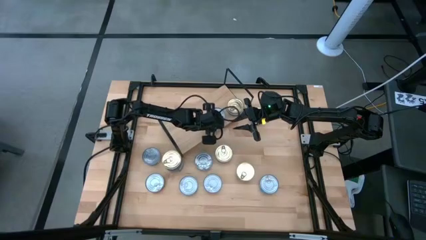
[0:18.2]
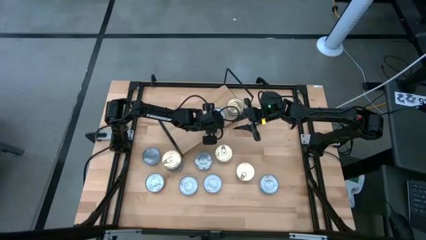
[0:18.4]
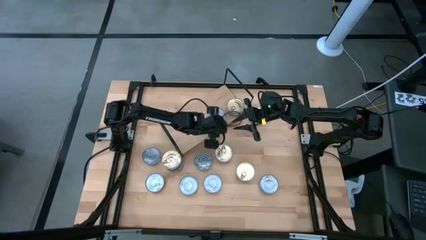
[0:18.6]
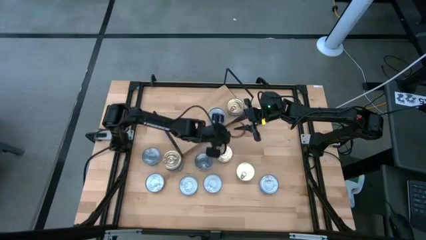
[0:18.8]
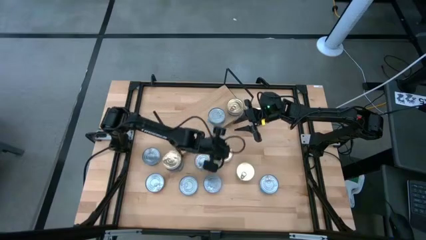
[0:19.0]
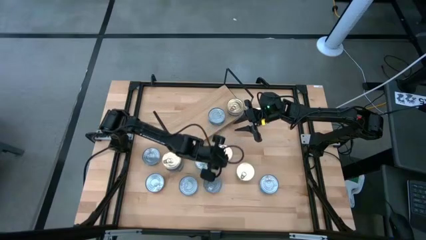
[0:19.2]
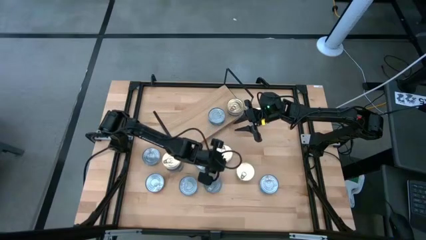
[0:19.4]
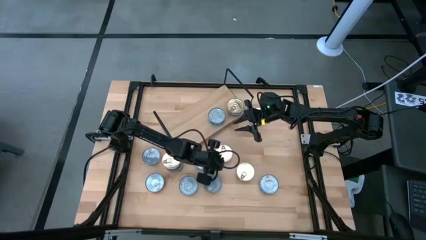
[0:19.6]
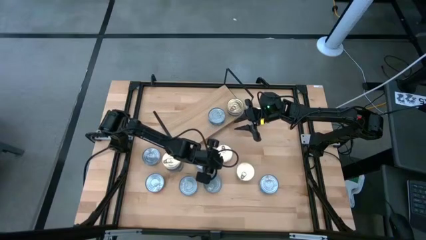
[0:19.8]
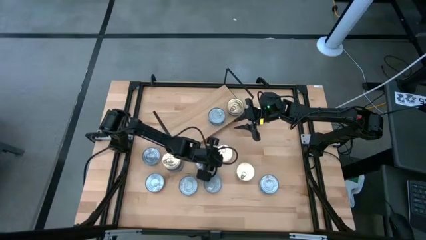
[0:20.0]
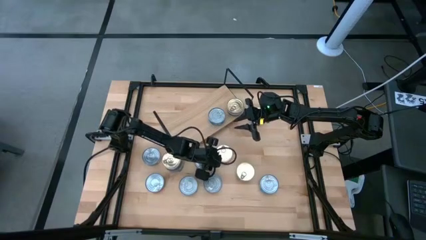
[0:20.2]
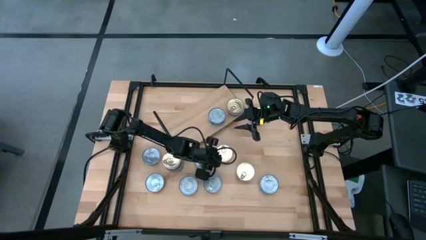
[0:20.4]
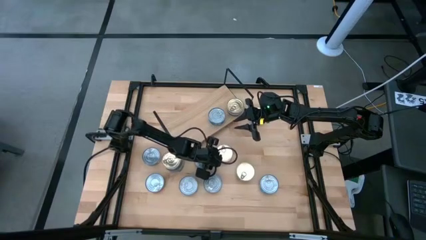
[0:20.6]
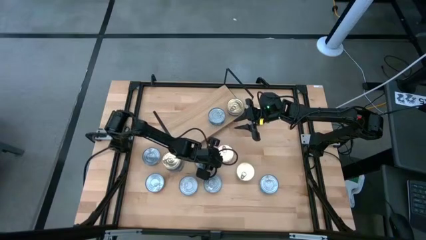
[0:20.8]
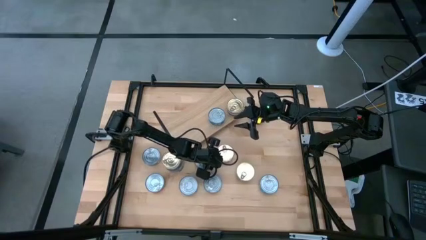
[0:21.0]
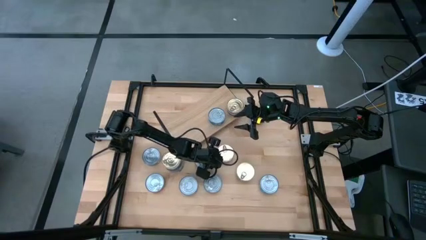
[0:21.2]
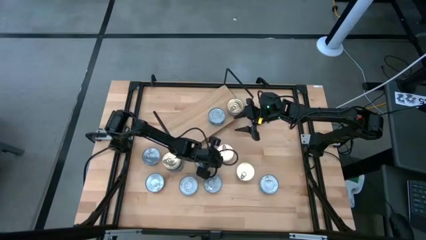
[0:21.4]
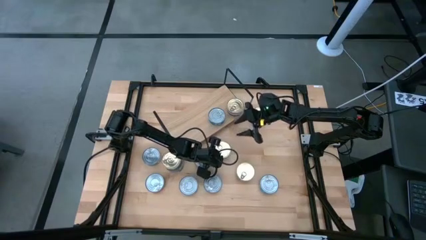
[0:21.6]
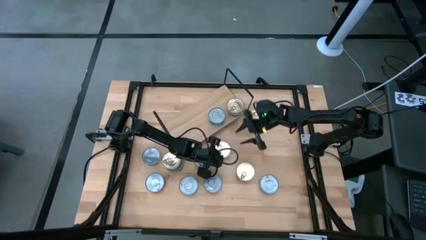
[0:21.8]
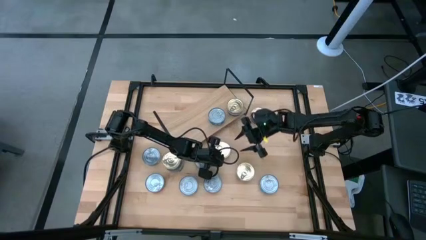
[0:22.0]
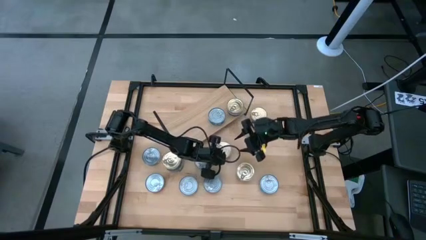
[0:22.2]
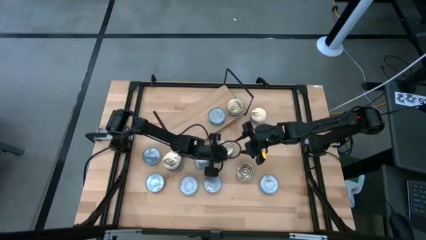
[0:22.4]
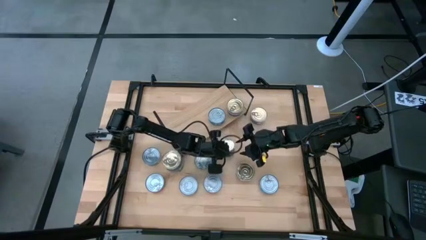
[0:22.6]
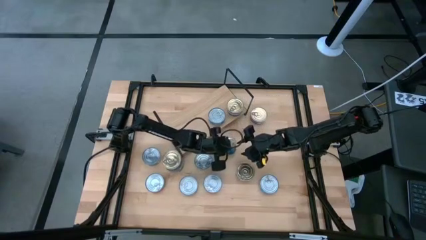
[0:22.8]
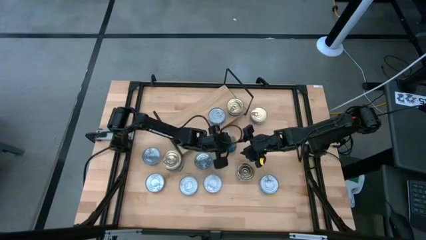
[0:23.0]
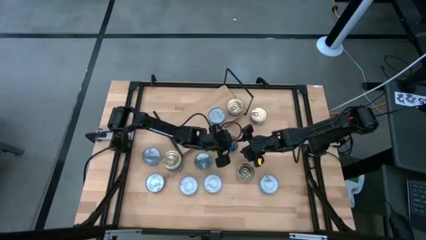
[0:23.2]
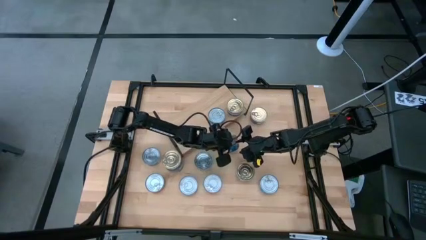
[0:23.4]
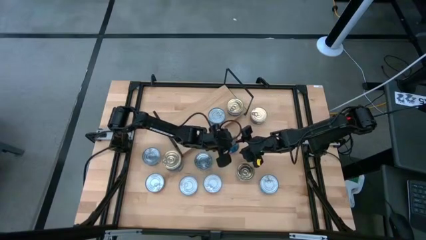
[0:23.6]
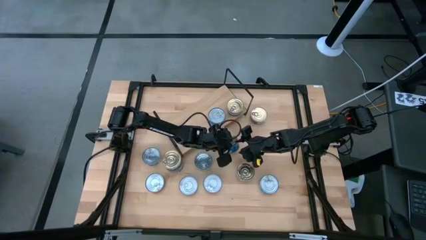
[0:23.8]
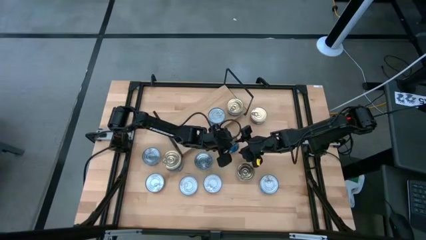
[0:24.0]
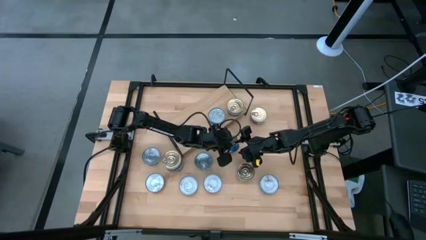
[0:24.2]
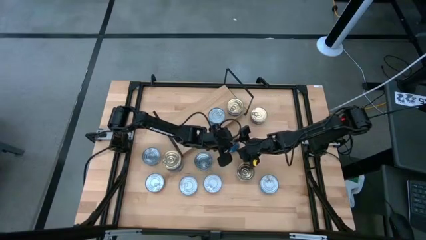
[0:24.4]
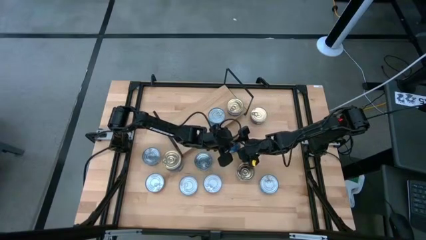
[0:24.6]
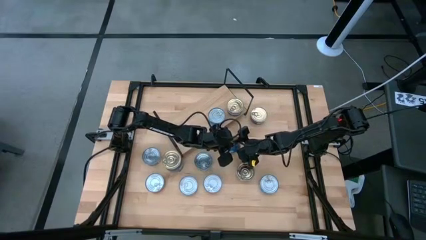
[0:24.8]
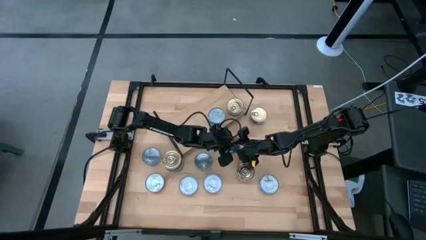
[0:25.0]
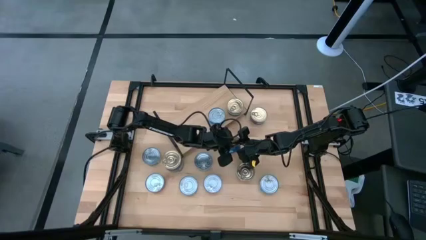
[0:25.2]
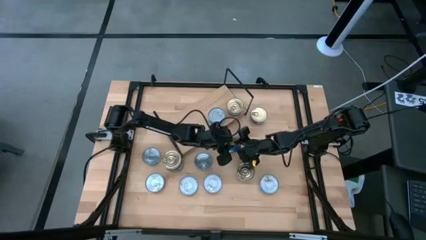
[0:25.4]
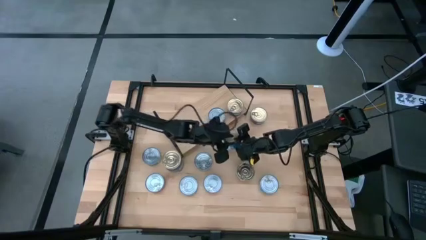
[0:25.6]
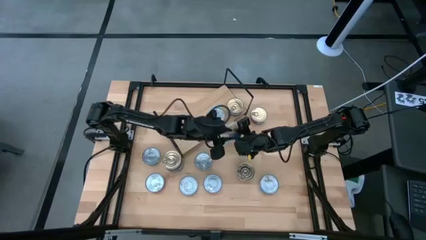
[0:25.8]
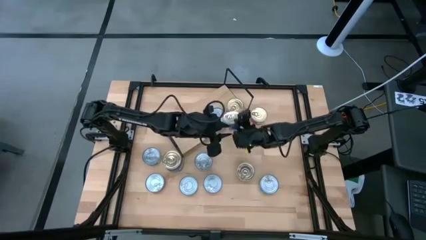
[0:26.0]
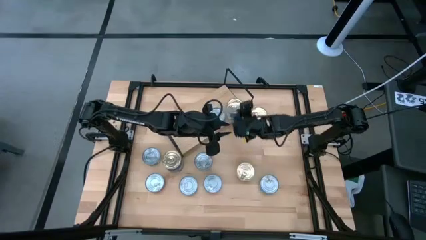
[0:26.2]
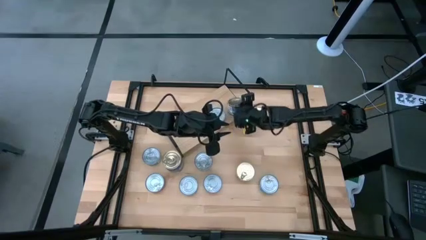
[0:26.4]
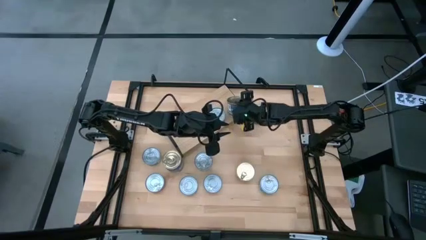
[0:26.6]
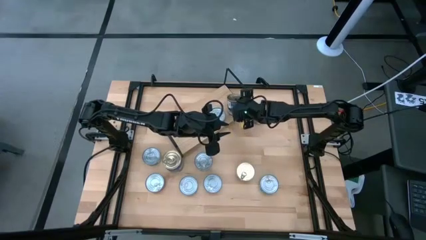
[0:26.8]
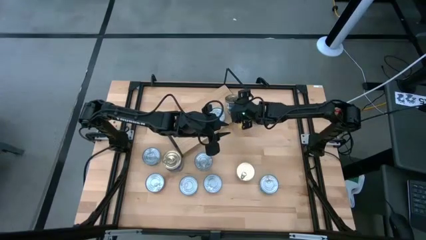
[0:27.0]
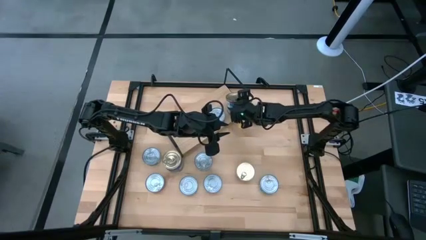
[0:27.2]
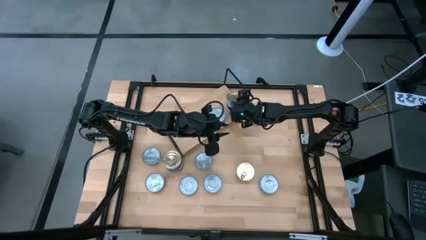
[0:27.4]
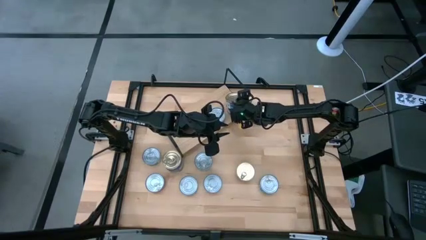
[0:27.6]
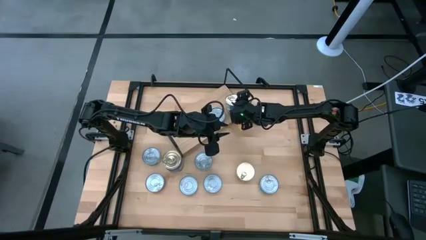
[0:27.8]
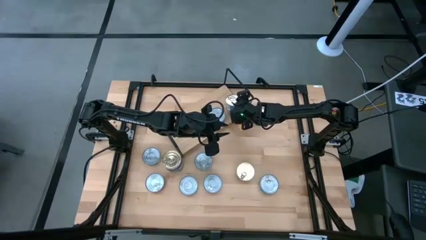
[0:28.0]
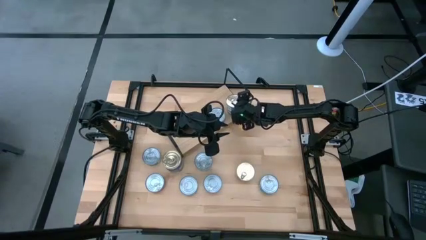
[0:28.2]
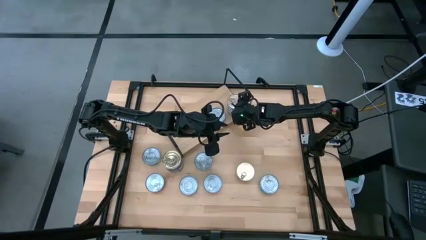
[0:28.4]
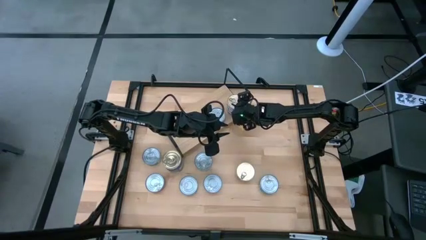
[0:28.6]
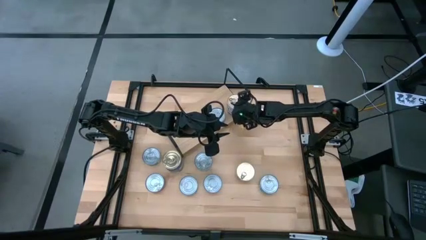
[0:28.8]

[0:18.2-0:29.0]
Task: Stack canned seafood by type on shelf
Stack the blue pink tuna can on top of the blue pink tuna can on the shelf

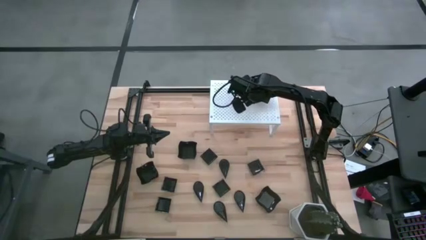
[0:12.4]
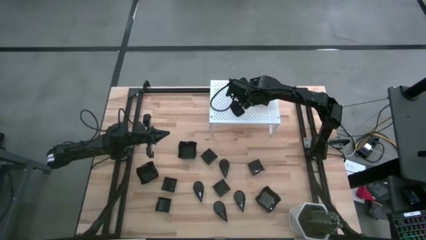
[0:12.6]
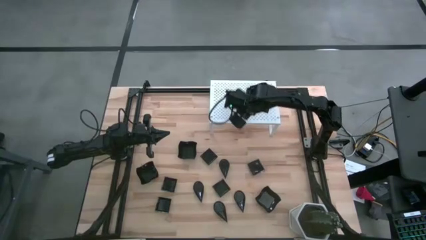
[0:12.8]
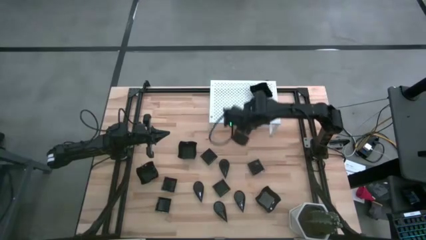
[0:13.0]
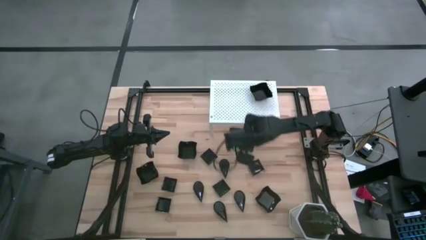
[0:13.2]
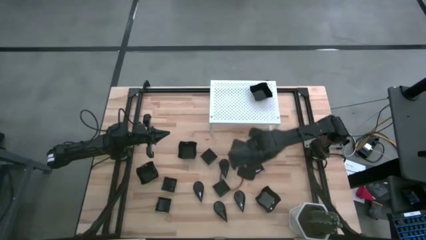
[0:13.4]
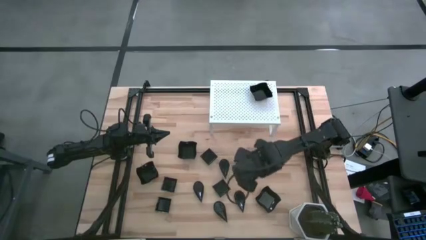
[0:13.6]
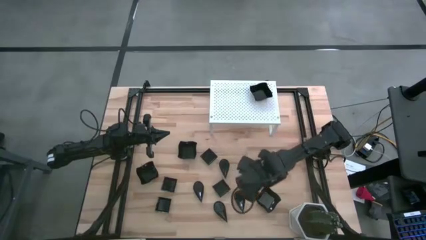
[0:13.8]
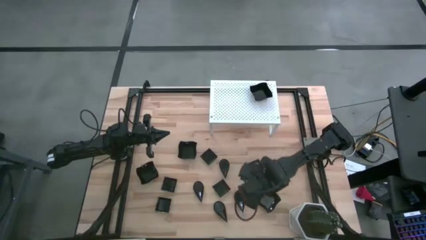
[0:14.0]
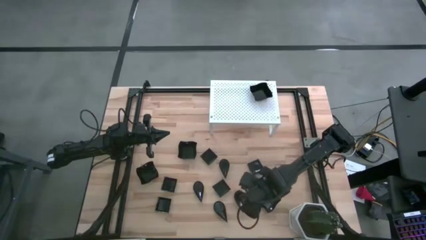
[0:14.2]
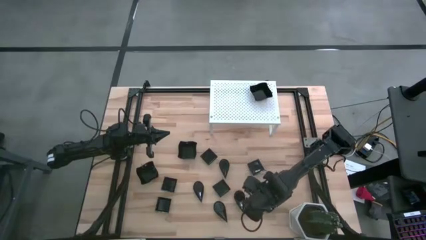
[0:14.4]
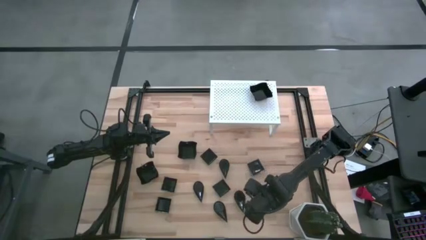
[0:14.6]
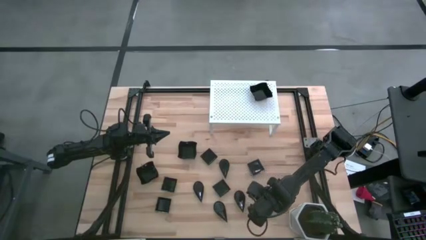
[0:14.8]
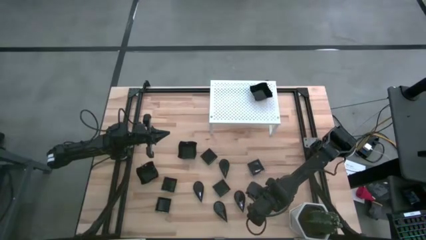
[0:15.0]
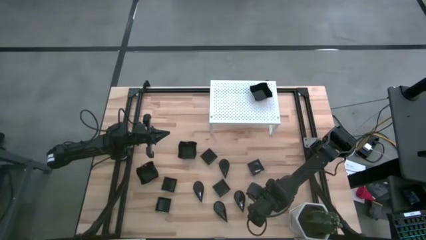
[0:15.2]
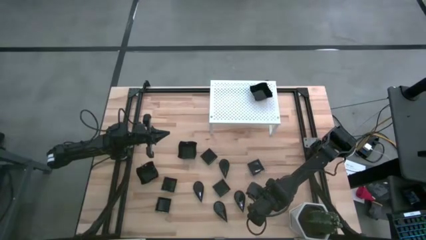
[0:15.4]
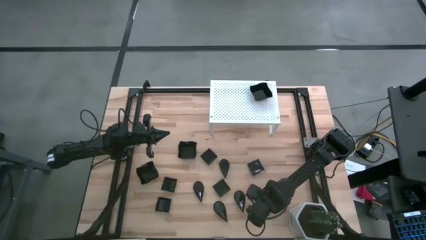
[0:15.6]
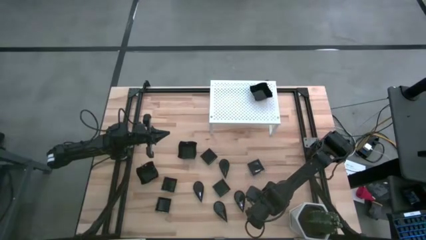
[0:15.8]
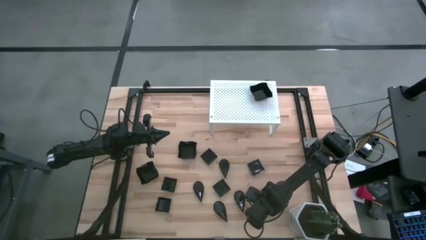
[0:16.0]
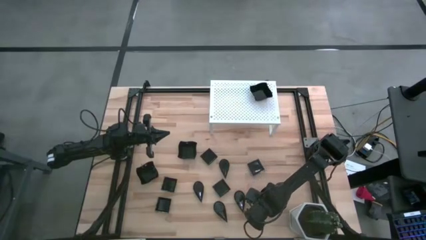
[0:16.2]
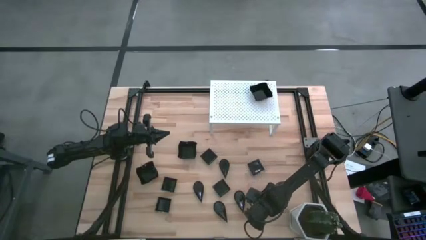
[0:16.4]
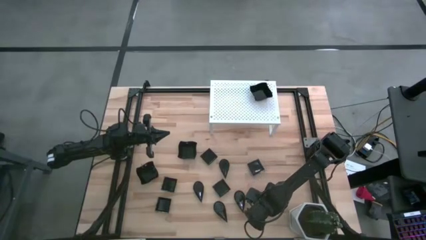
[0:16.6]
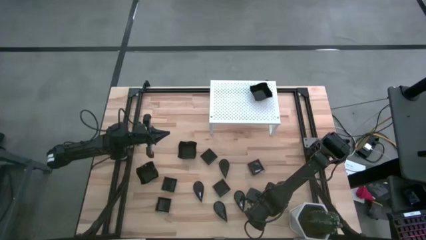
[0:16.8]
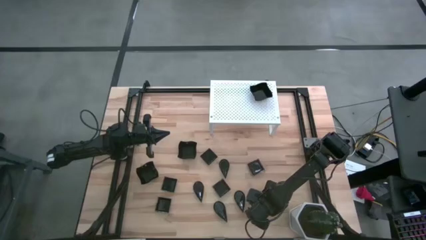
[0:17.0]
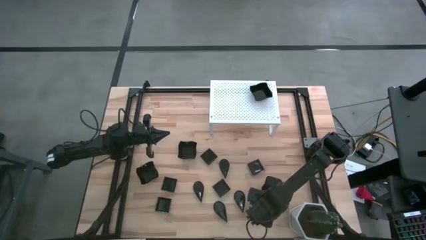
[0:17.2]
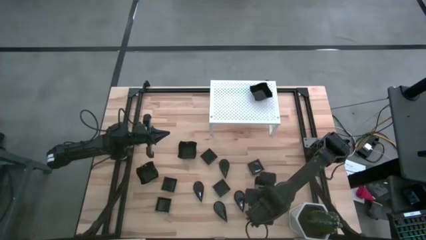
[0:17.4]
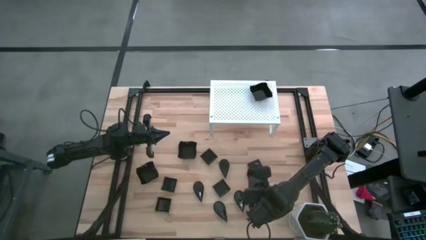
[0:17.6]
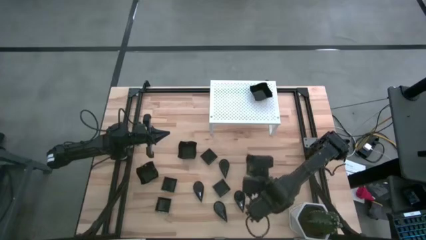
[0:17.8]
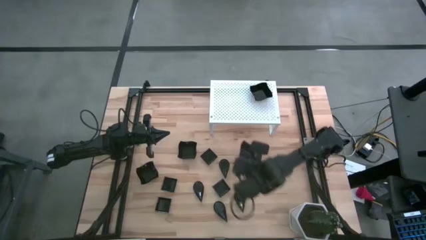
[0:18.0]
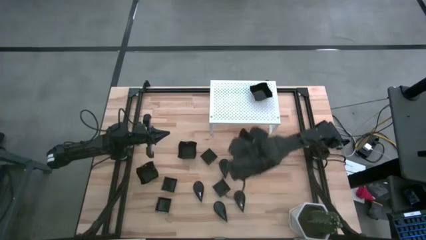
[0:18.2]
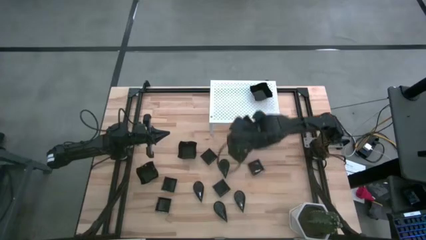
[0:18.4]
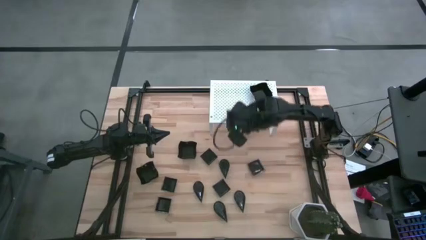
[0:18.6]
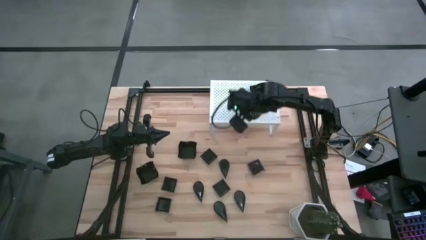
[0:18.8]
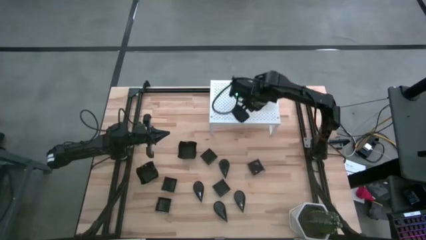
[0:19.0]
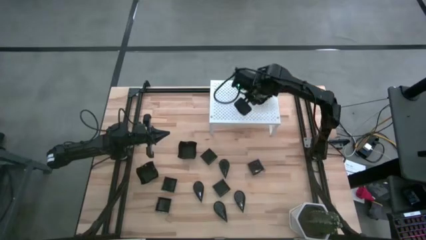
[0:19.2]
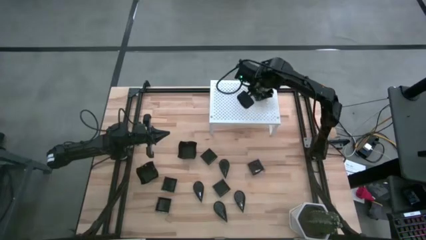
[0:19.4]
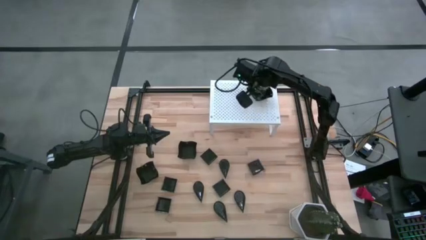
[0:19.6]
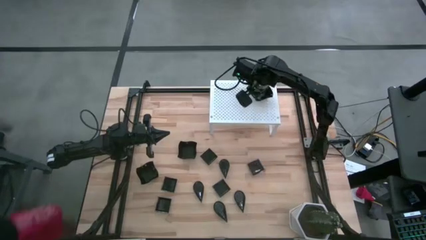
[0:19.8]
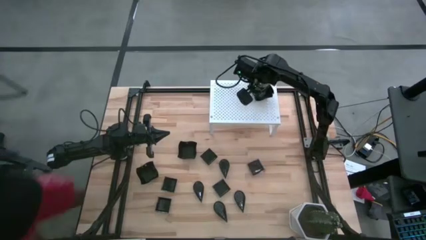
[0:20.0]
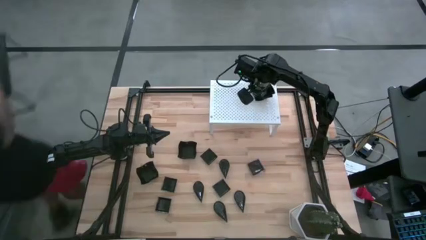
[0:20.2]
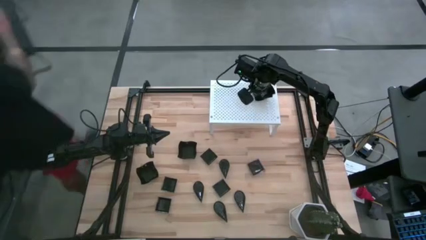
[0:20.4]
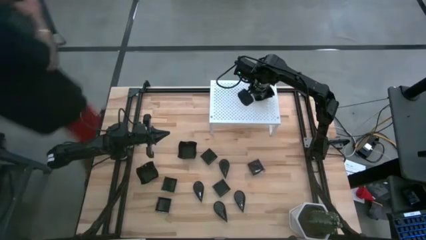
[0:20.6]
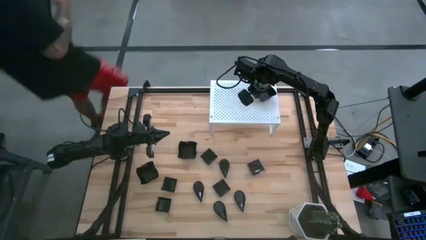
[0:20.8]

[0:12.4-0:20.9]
Task: Pick & Place Mini shaped plates
Stack the distorted square plate on top of the distorted square plate on the shelf
